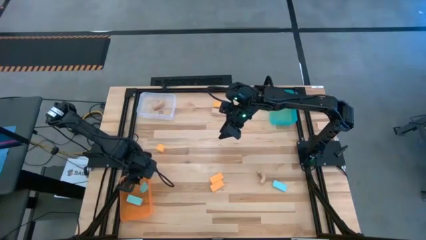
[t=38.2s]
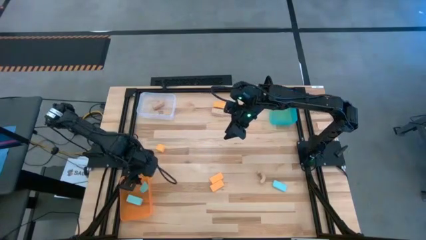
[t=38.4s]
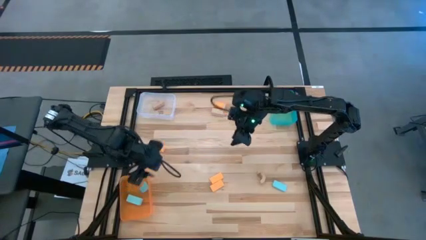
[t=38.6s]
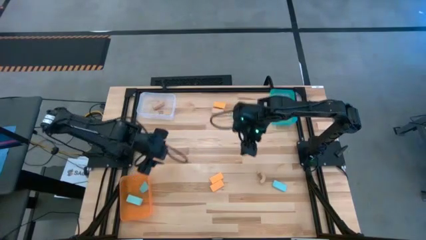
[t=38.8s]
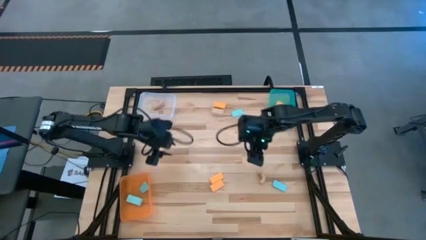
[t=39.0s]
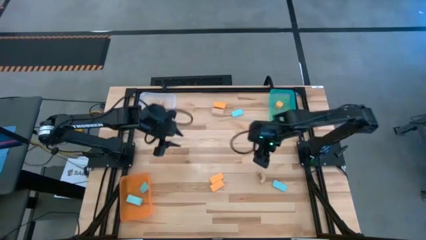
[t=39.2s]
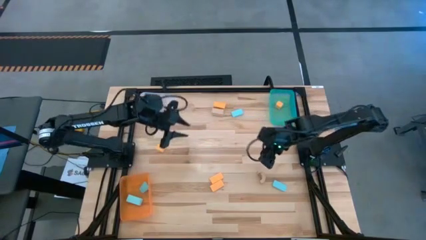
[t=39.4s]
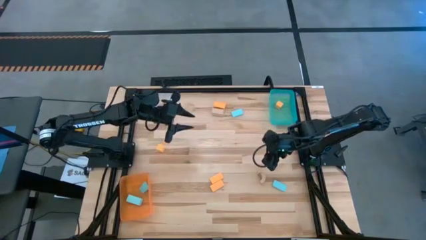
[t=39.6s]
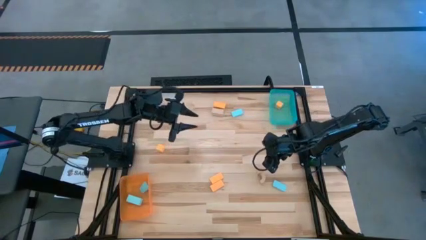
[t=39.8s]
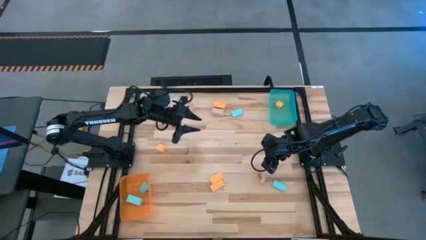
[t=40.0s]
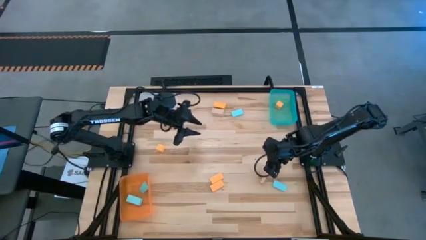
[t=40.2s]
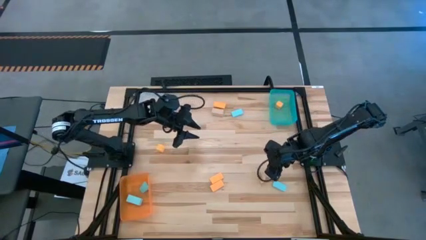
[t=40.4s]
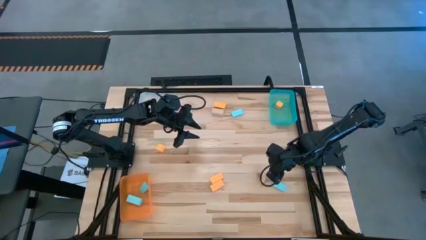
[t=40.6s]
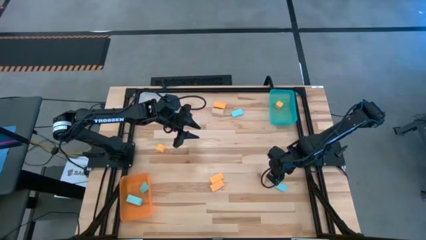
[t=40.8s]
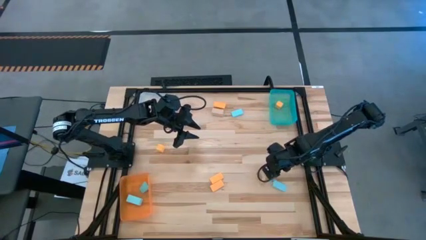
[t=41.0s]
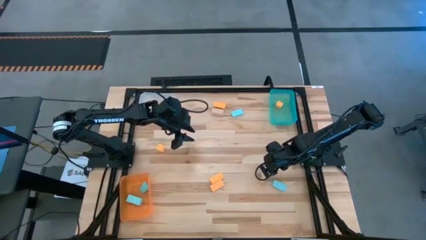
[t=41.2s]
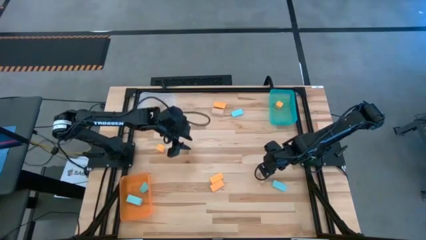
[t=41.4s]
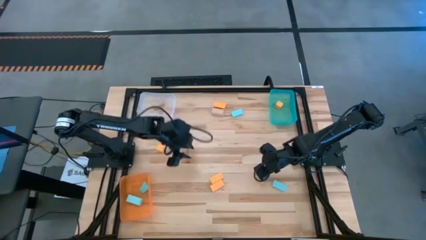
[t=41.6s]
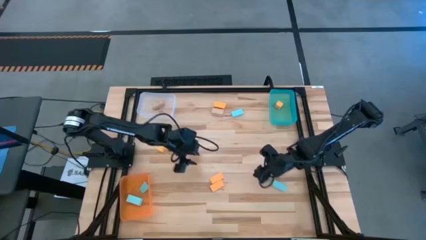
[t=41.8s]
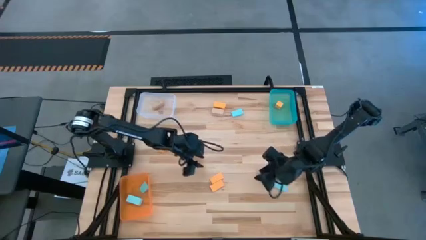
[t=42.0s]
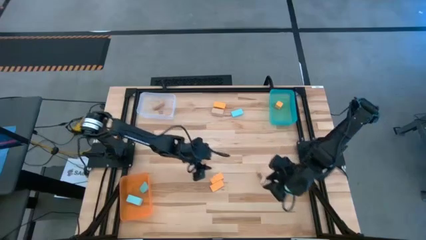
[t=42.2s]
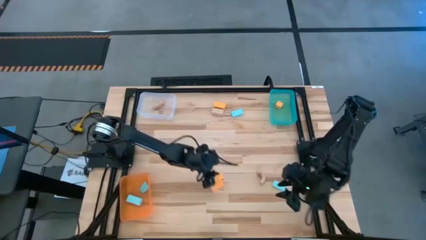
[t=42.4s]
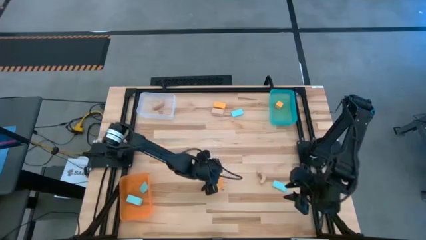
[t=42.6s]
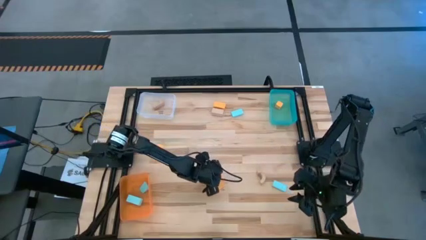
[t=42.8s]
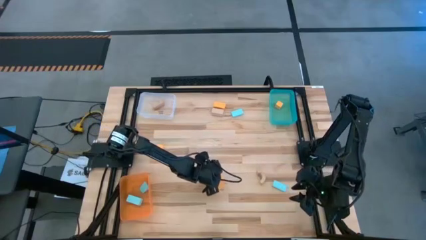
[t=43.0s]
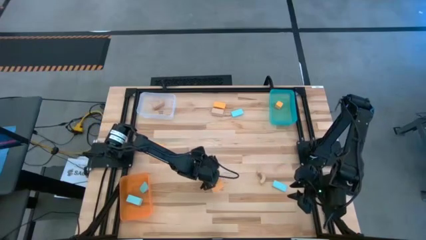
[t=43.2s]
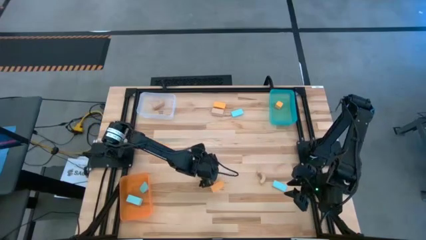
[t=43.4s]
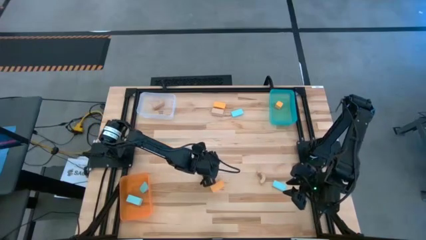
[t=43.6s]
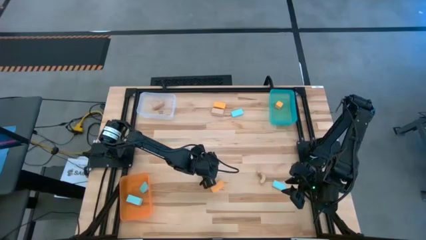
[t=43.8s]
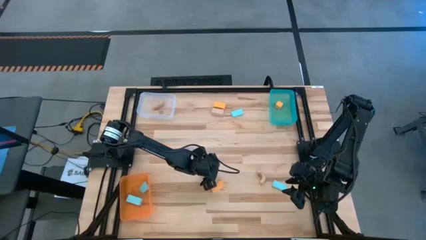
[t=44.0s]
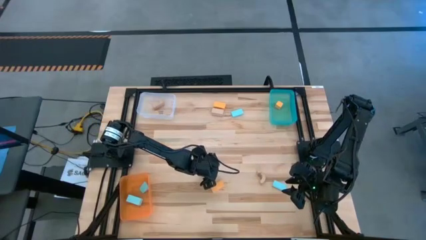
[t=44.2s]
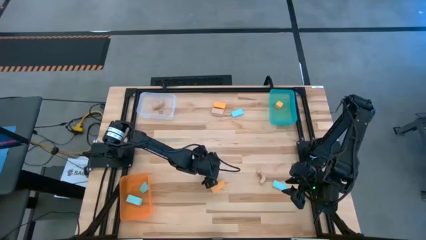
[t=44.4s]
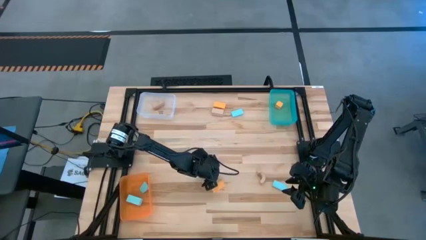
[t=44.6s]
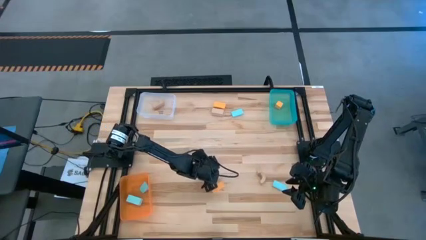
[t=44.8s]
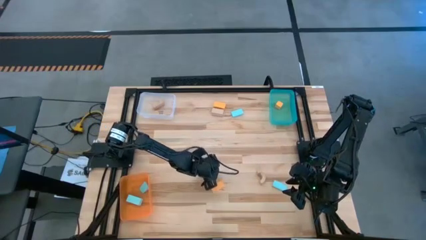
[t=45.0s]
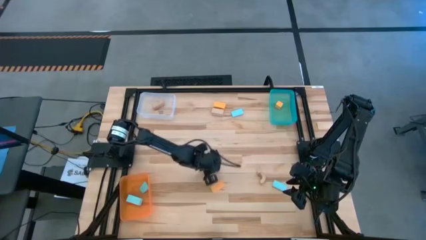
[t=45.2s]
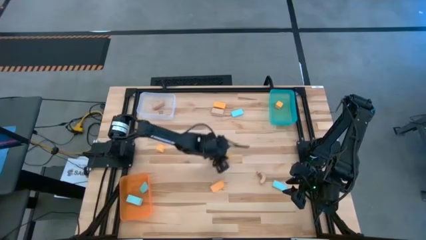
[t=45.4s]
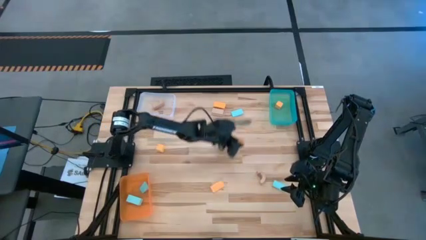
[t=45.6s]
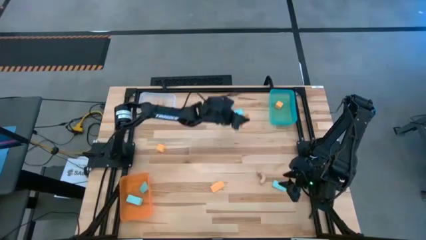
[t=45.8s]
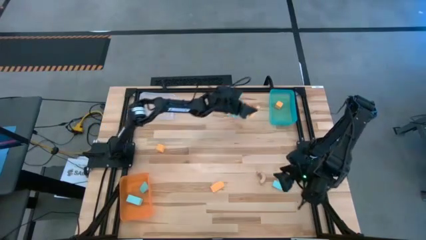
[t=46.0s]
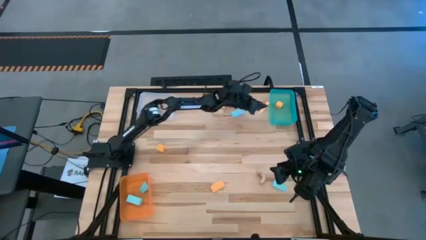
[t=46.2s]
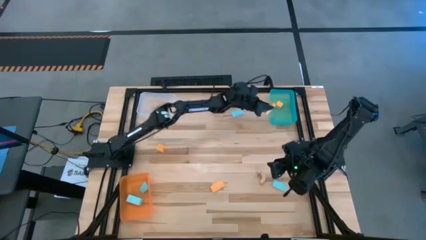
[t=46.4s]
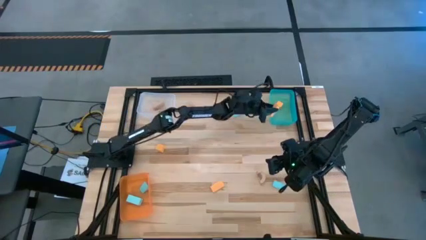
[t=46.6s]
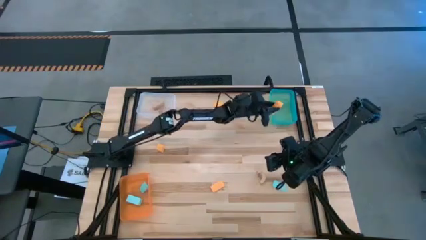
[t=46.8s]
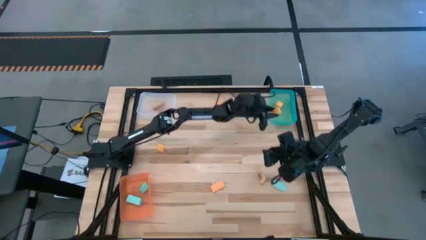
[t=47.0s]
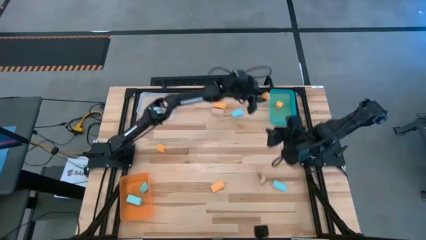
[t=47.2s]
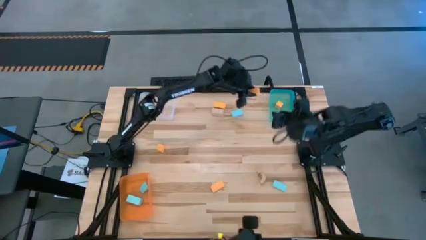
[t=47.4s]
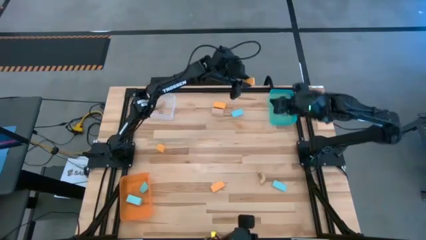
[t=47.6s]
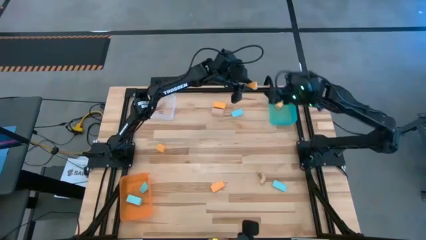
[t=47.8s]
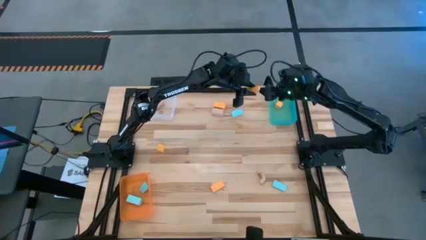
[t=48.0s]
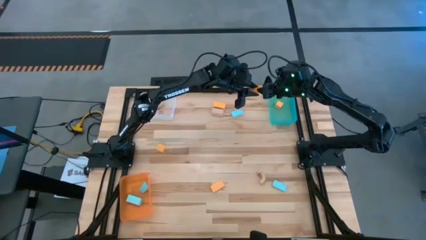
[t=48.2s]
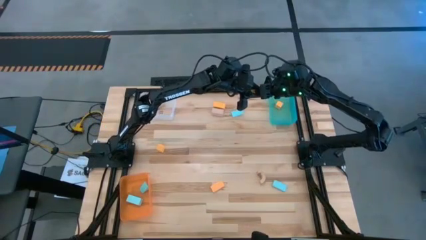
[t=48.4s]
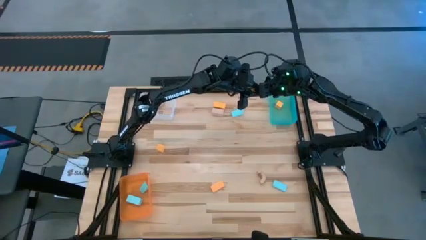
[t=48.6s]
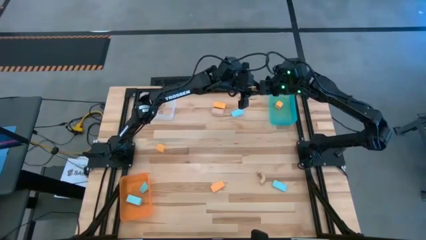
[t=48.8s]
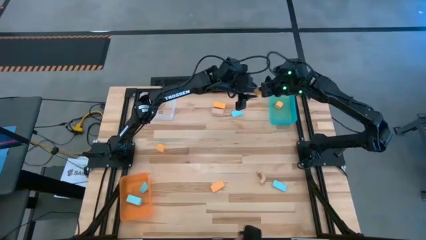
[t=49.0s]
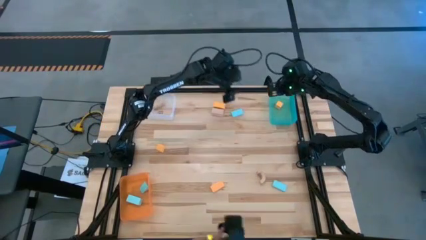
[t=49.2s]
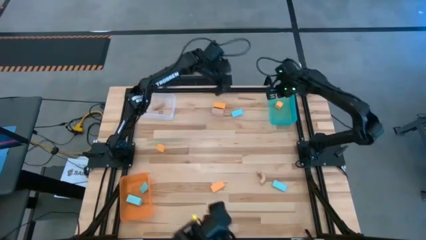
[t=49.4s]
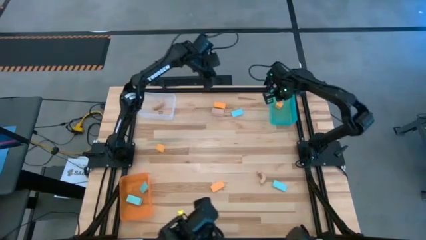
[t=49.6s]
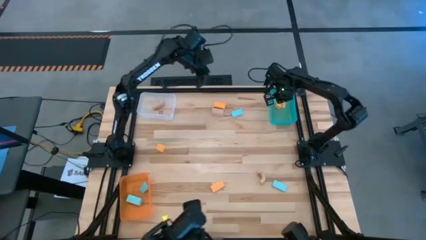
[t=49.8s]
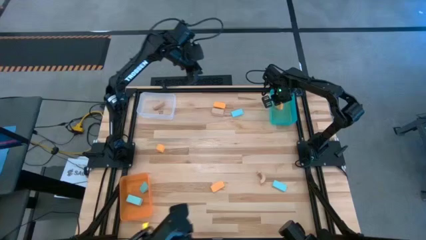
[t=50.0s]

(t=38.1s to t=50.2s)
Task: Sort & place blocks by color
Put the orange block into the light blue bin

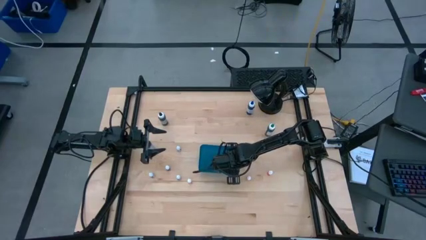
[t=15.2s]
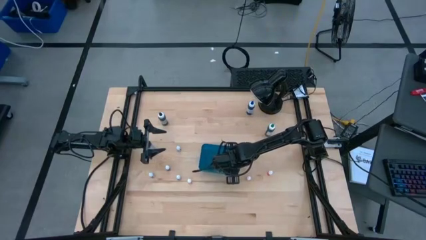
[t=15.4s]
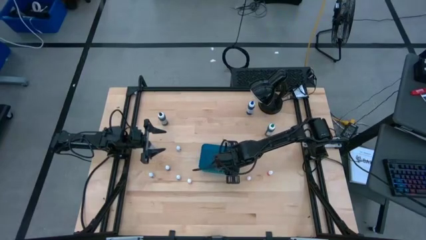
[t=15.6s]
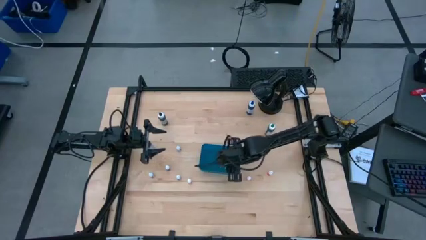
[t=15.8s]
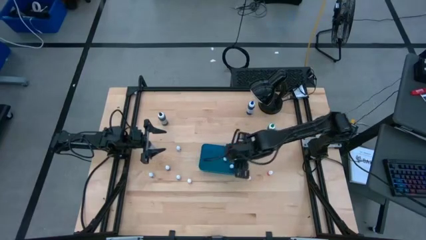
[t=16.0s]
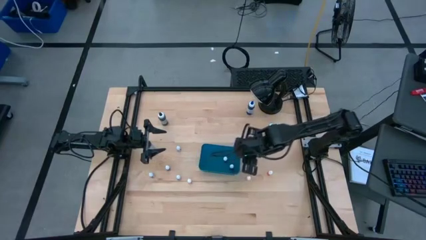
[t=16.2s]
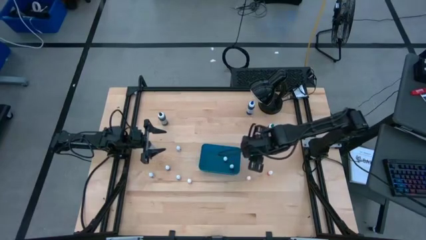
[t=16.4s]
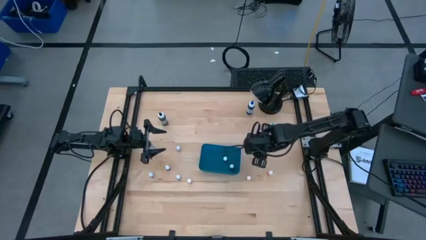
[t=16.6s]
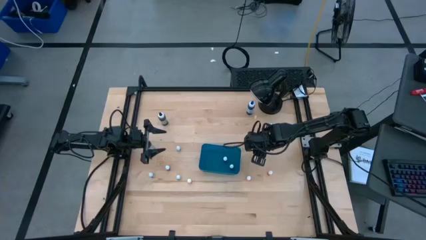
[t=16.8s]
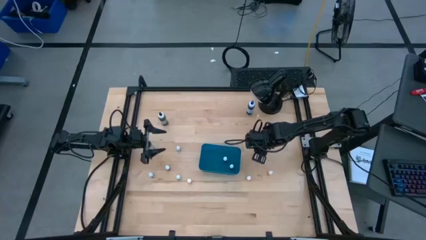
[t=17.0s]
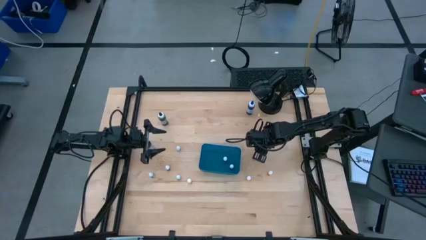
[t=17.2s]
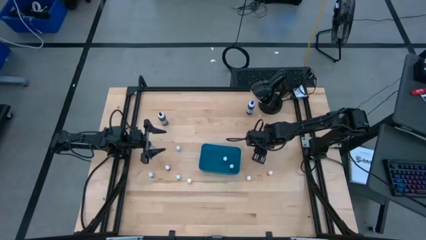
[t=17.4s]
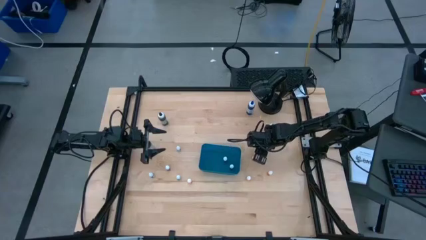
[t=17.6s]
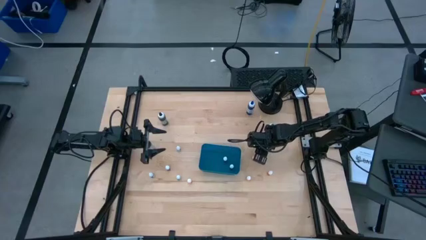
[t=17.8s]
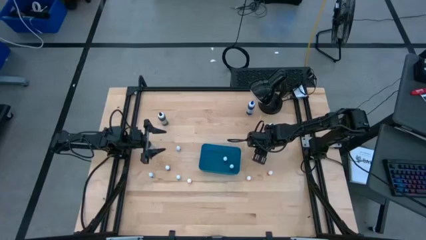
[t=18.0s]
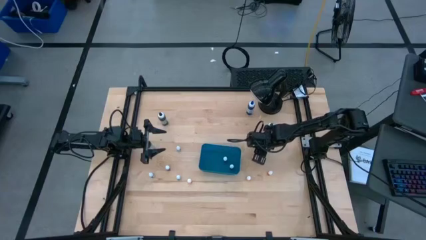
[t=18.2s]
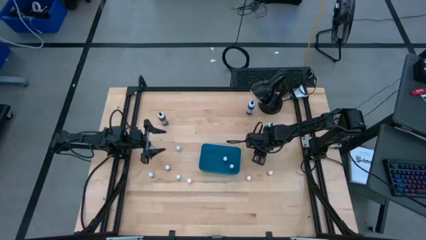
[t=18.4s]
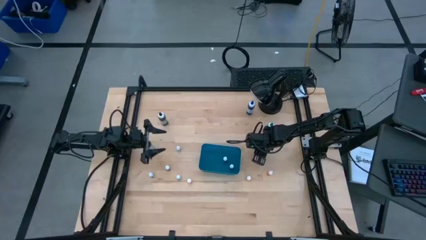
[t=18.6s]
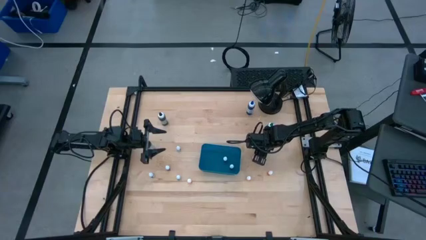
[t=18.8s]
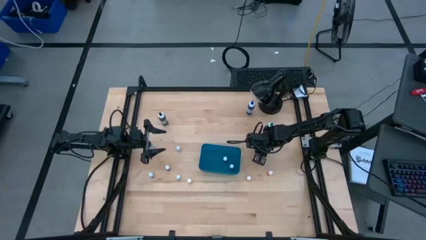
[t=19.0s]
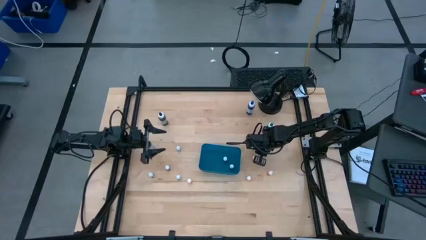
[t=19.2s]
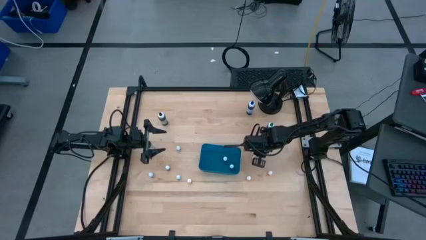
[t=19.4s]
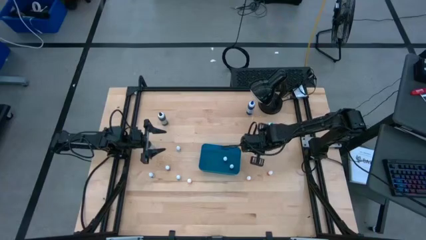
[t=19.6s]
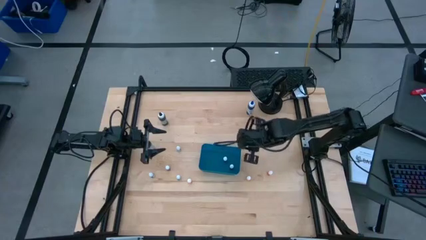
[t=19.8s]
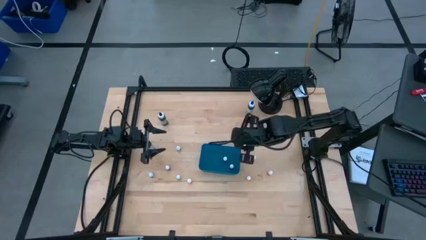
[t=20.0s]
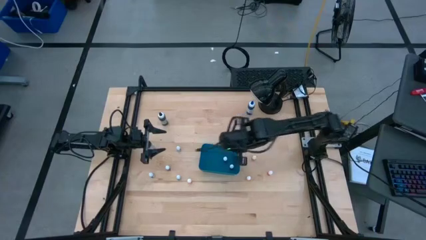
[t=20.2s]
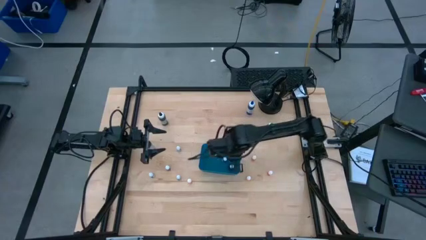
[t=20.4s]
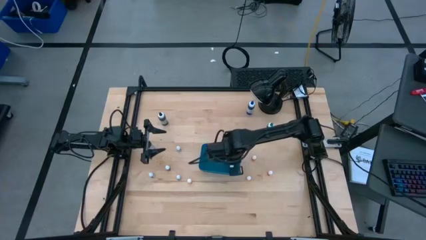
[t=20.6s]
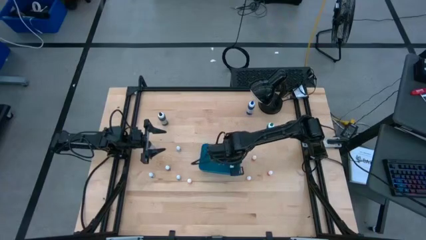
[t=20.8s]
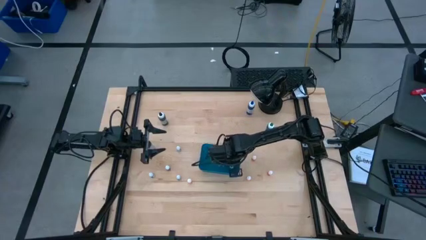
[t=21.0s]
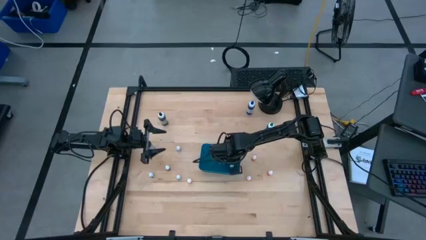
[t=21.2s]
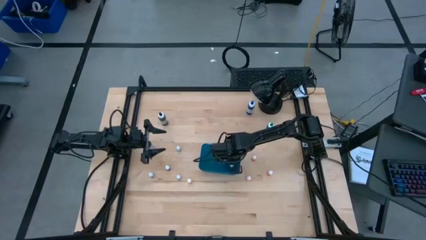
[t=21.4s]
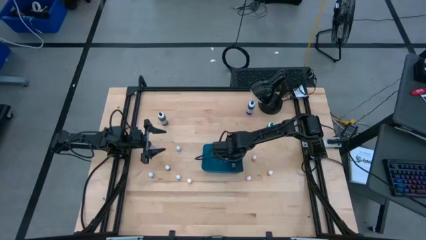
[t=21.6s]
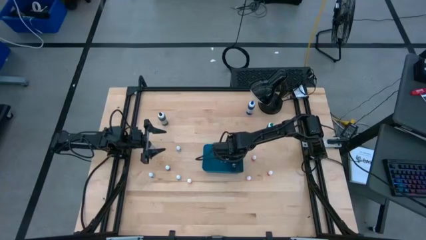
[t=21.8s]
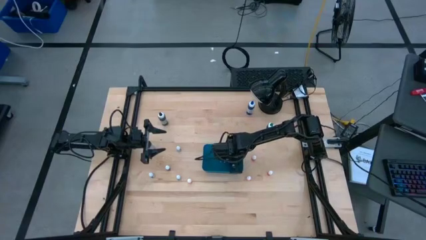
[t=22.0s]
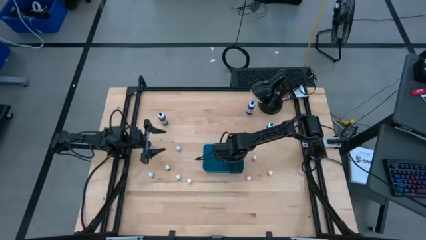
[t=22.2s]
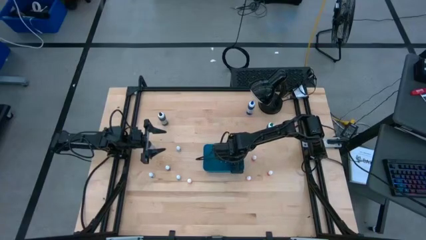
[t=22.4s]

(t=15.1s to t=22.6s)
Task: Pick & Place food coloring
Put the small black food coloring bottle into the blue bin
